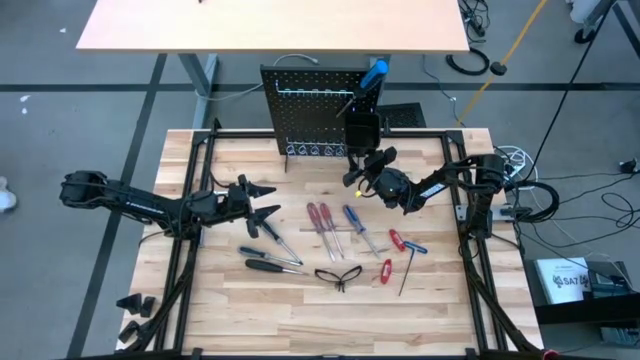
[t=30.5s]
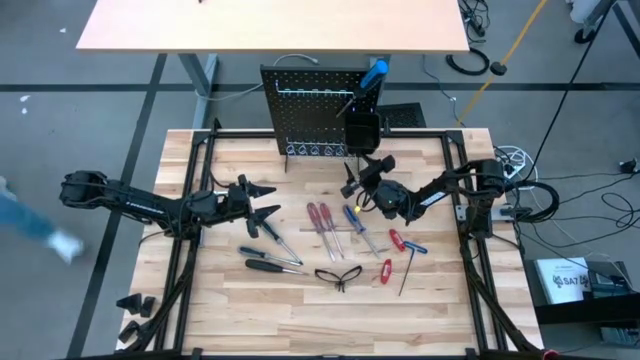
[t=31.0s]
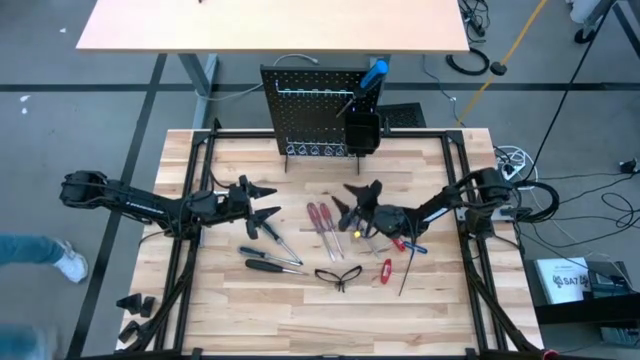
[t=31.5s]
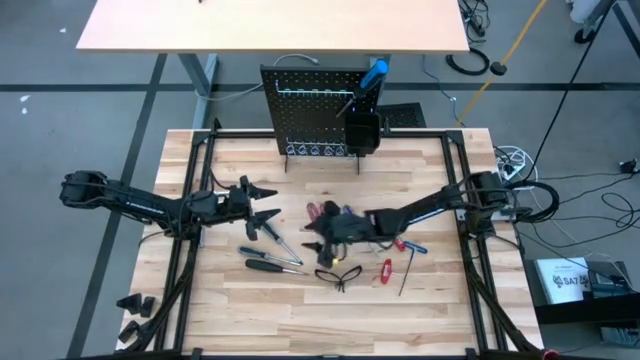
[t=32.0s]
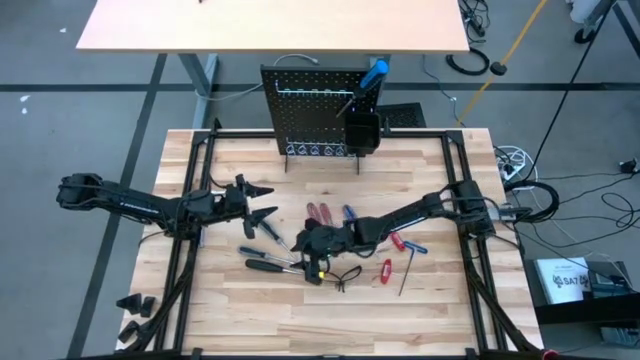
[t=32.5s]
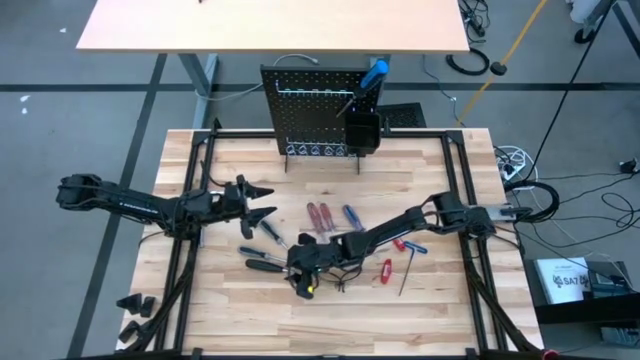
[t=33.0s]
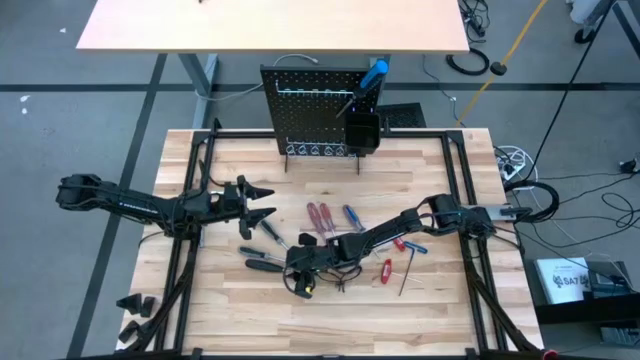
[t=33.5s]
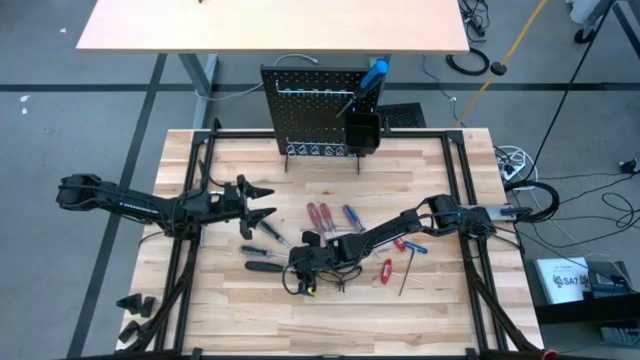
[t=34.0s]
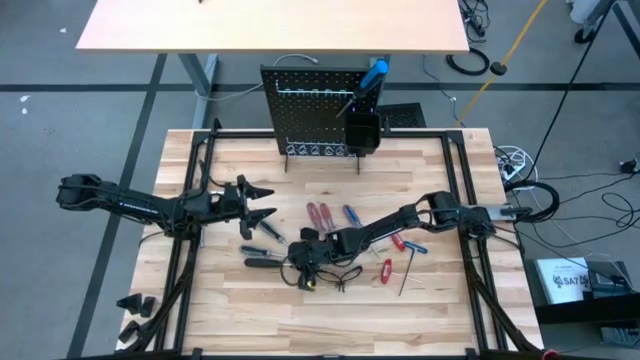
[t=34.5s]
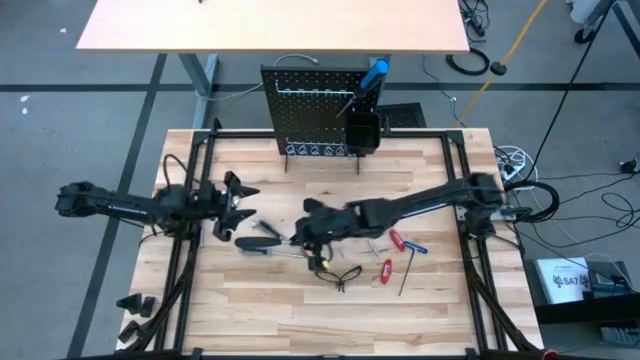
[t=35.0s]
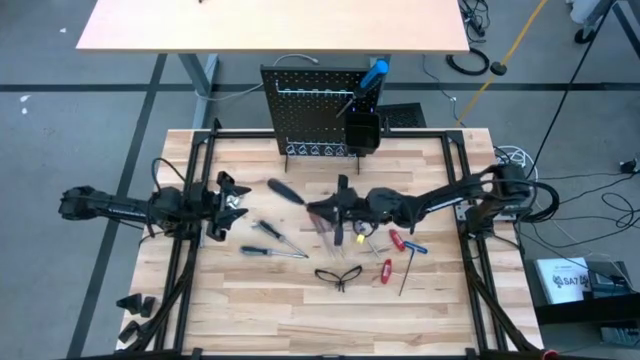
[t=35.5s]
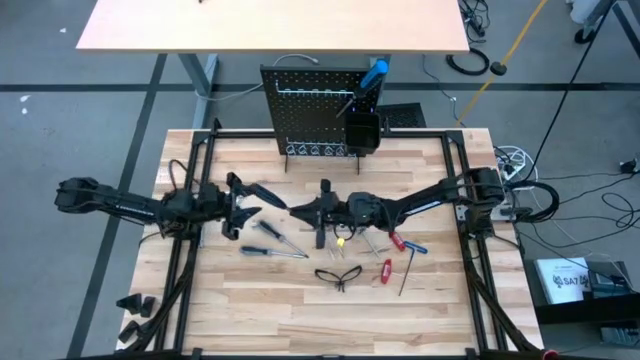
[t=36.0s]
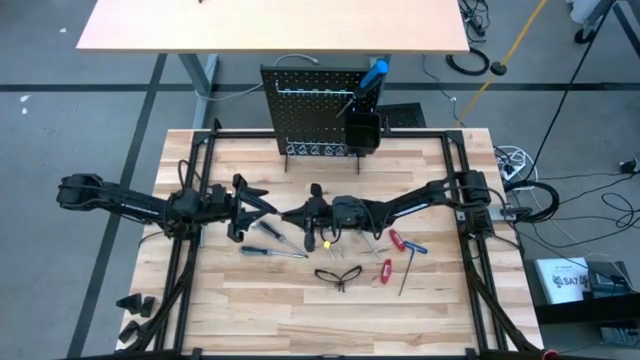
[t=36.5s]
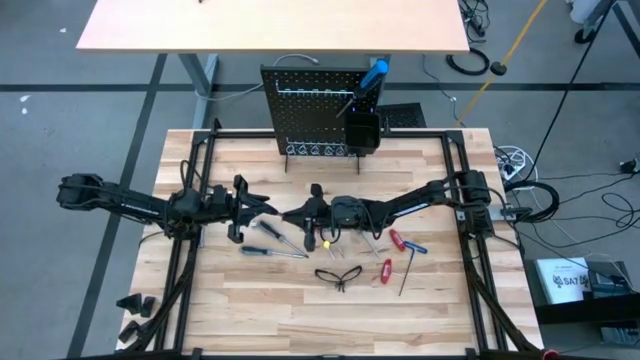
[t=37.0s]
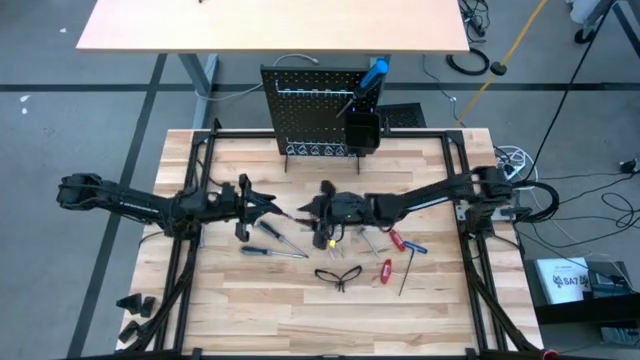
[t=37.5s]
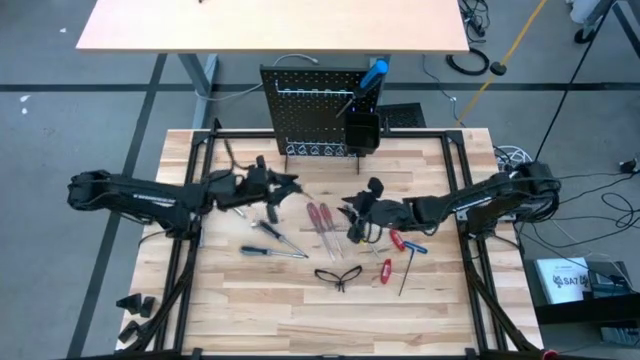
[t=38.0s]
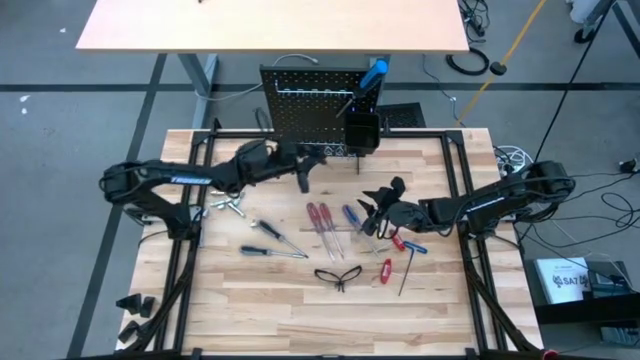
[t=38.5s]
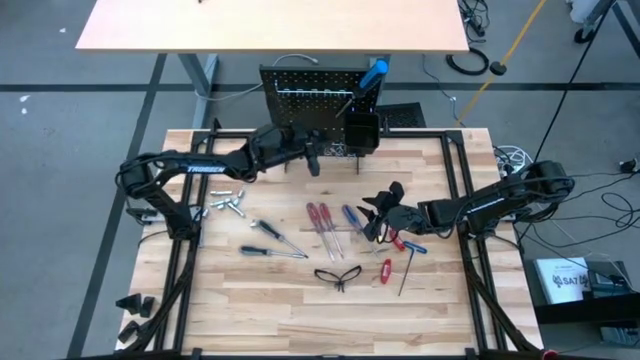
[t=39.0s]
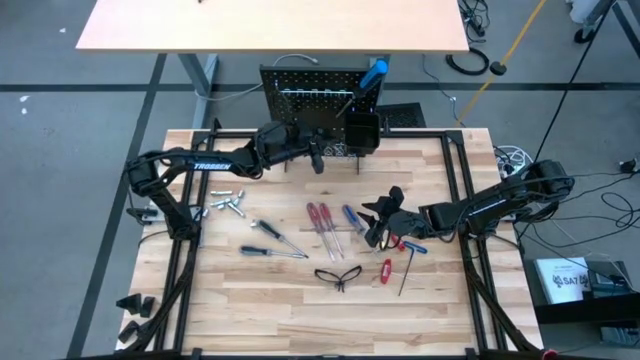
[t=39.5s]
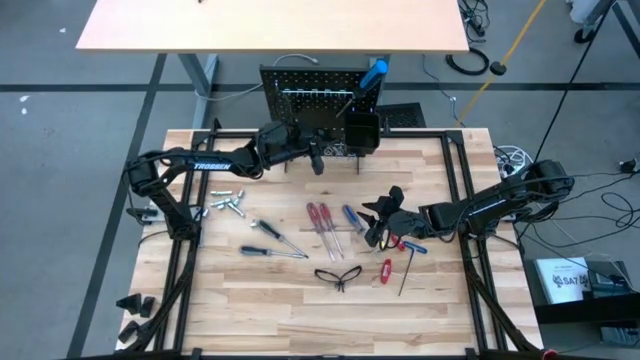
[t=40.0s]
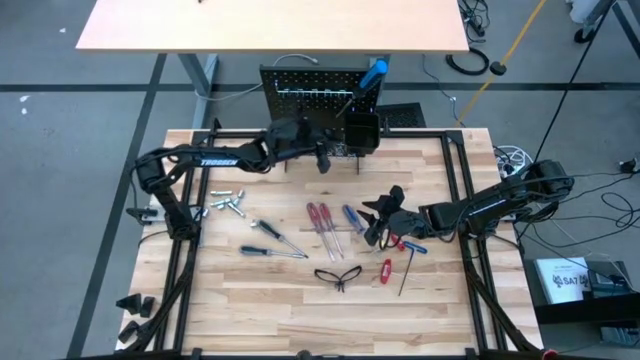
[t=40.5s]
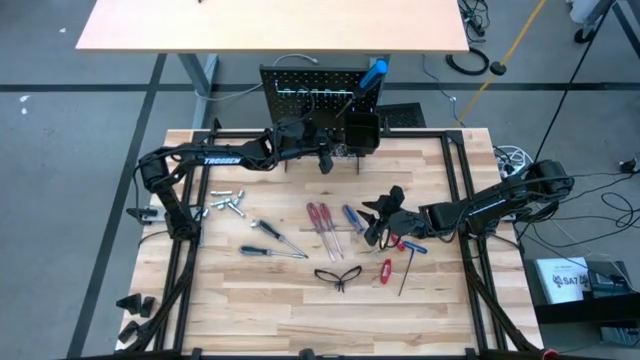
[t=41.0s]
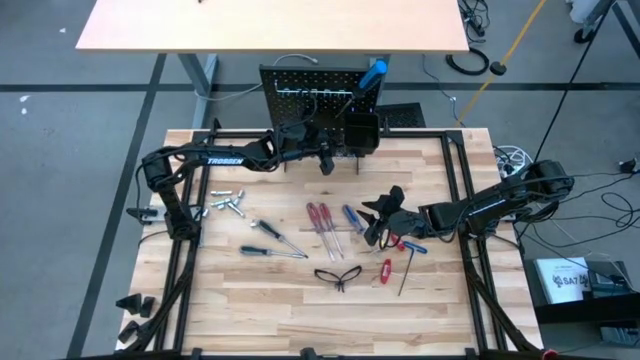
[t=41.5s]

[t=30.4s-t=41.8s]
Task: Hang tools onto peg board
Hang the black screwdriver onto the peg board

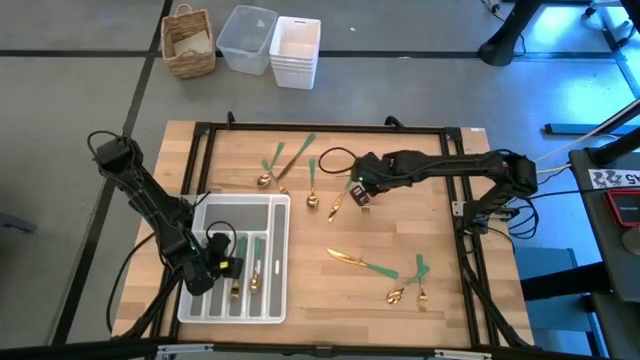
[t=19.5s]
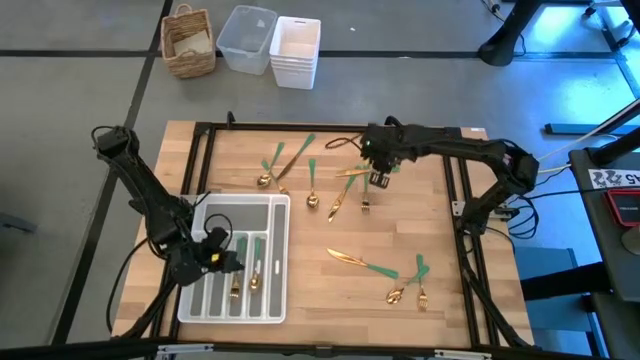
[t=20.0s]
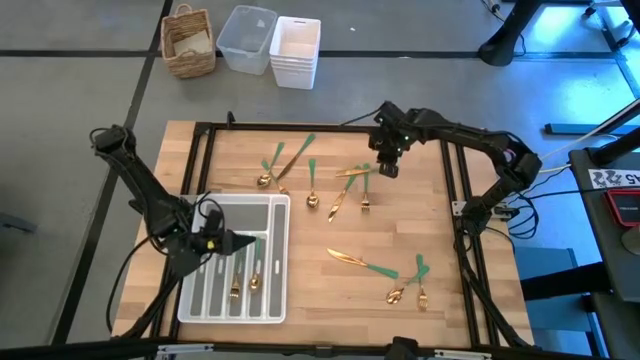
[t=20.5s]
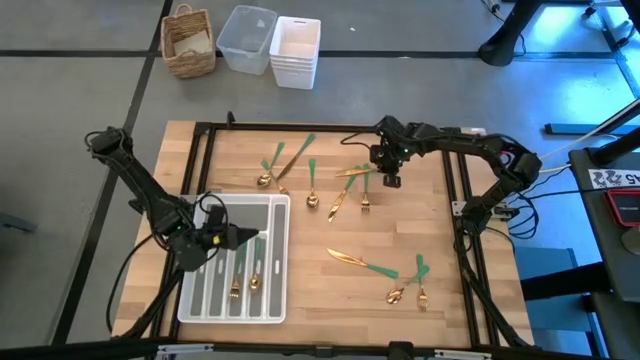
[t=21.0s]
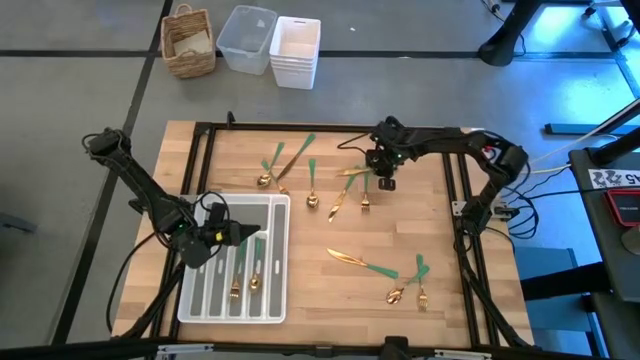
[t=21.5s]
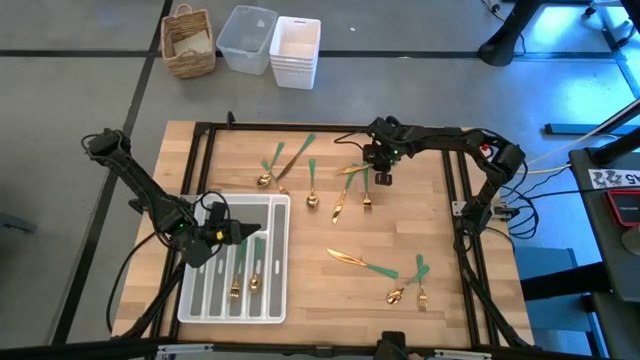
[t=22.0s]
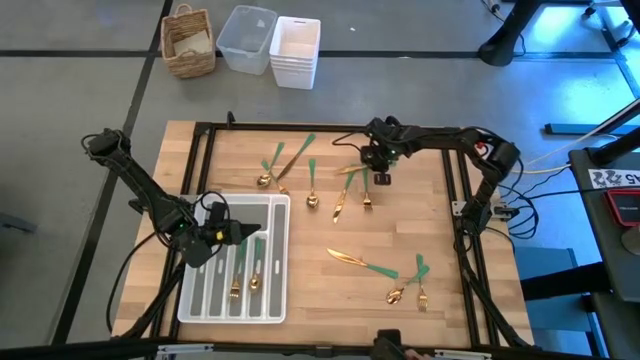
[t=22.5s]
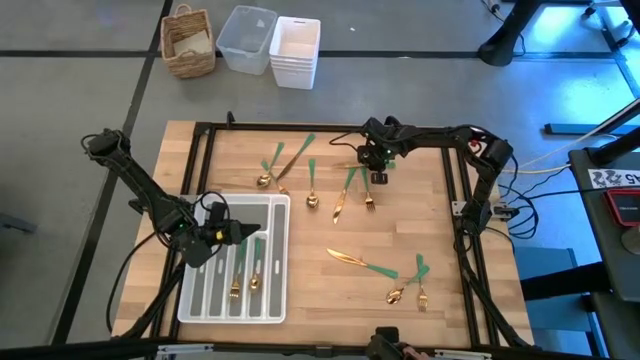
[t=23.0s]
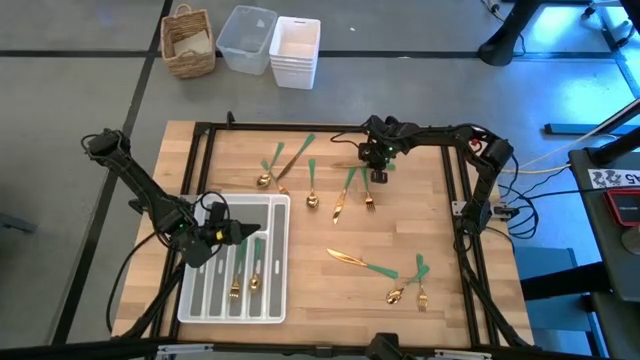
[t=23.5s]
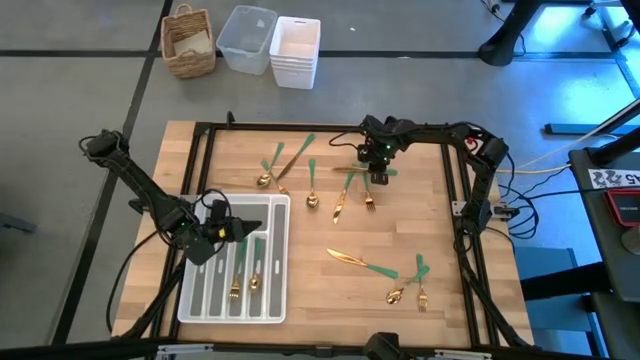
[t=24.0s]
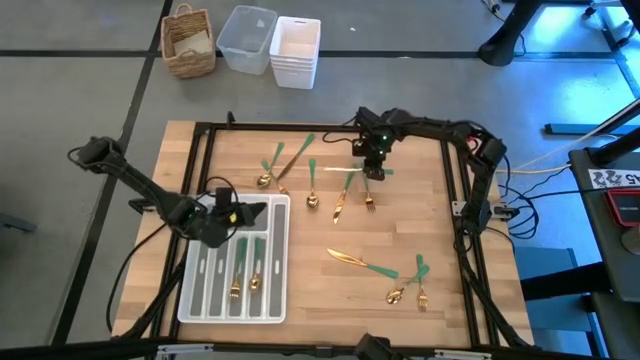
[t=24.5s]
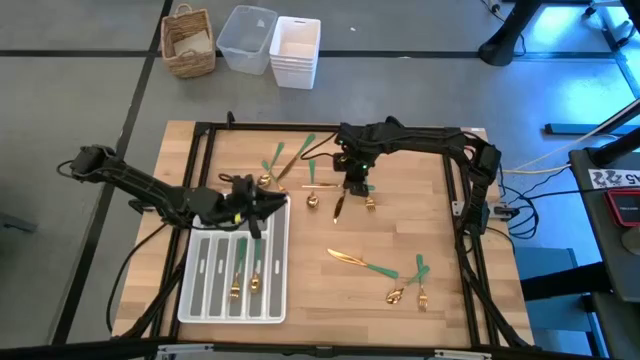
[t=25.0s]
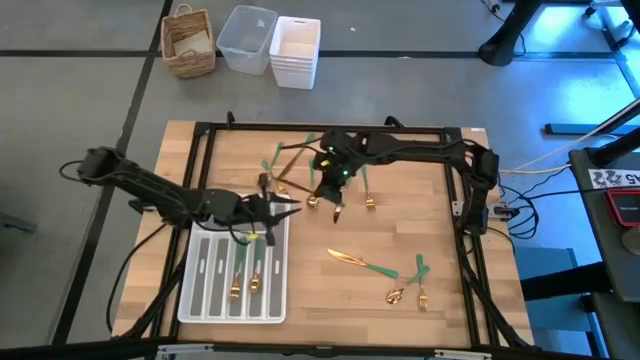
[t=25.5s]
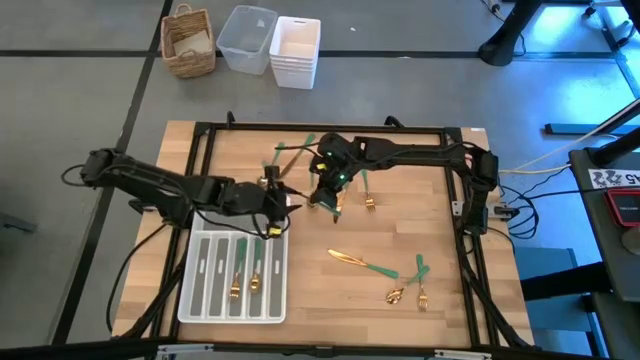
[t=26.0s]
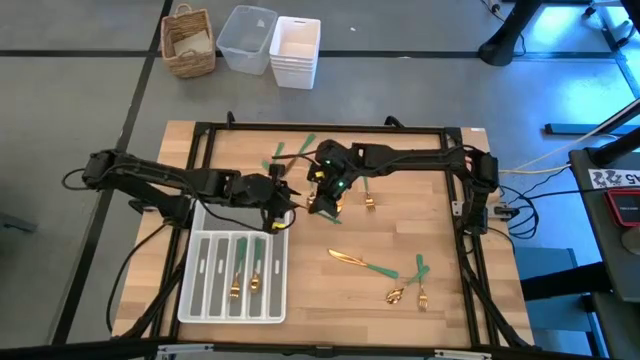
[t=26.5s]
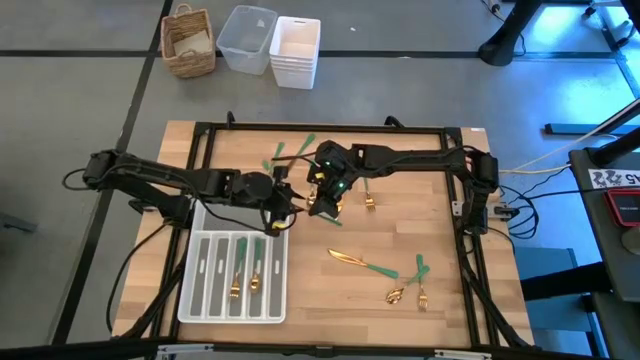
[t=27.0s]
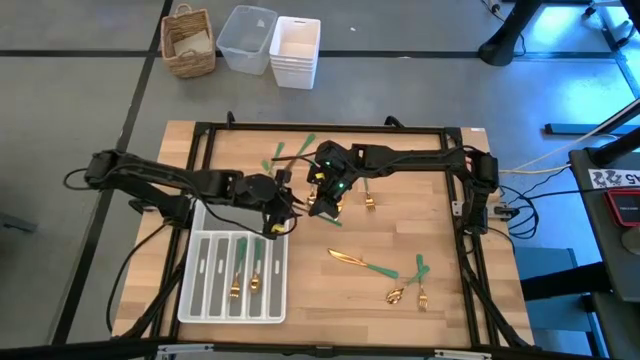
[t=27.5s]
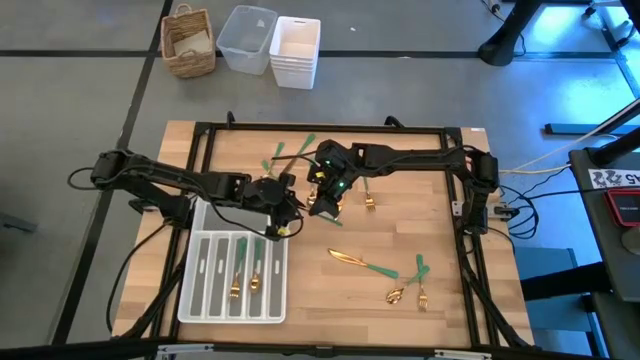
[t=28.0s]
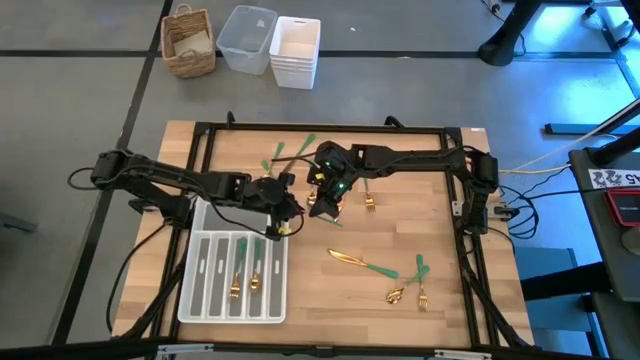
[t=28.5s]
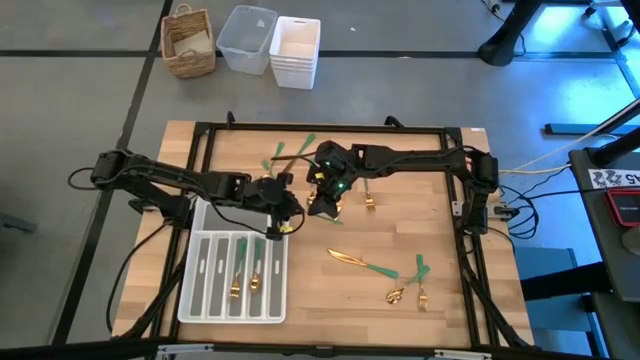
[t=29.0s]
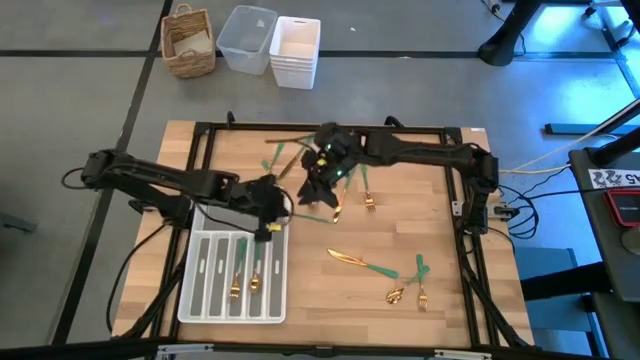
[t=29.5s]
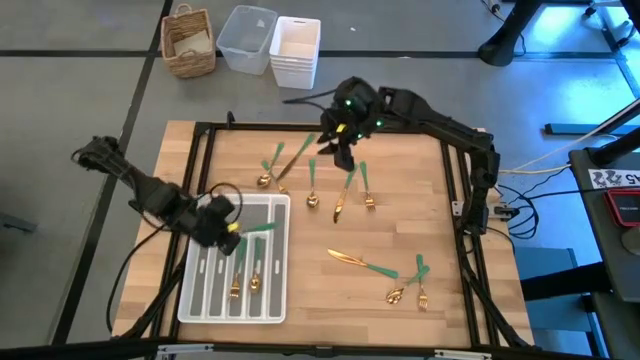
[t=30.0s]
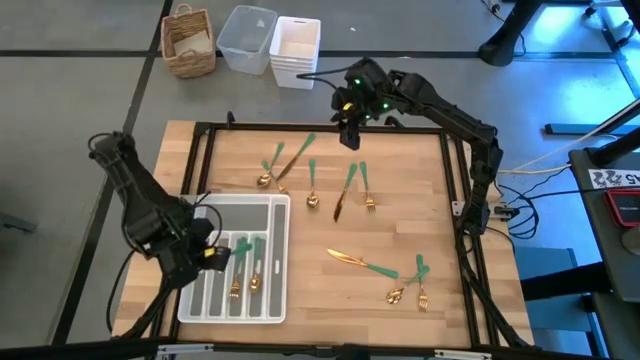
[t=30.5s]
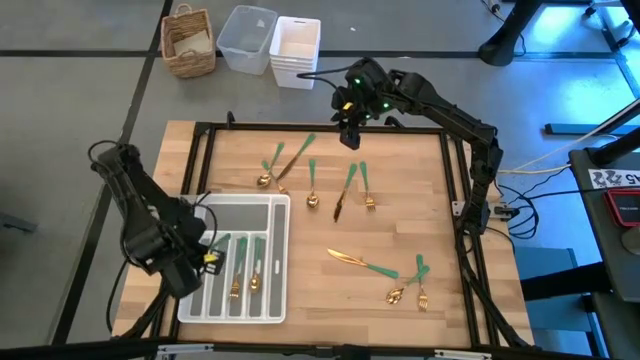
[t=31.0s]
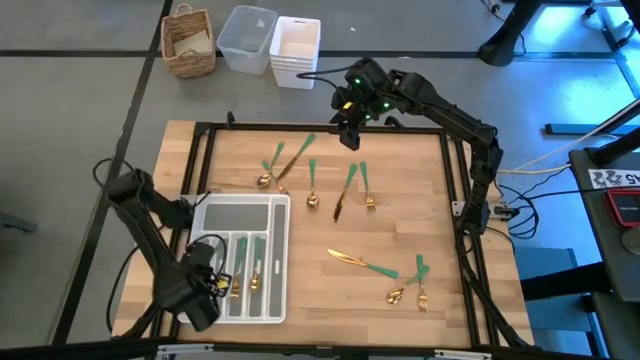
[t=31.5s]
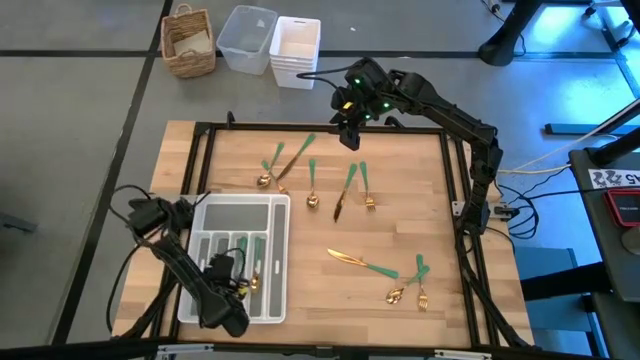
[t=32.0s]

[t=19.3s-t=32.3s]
Task: Sort silverware
Put the green knife on the silverware tray
